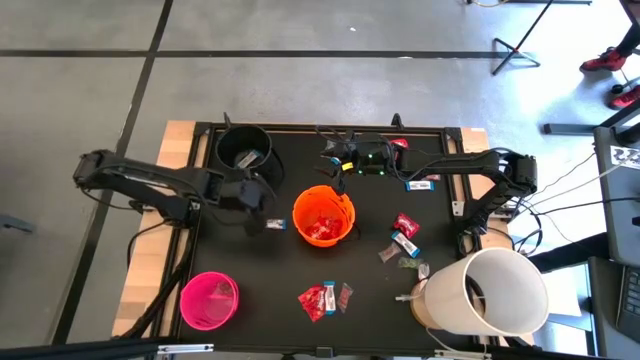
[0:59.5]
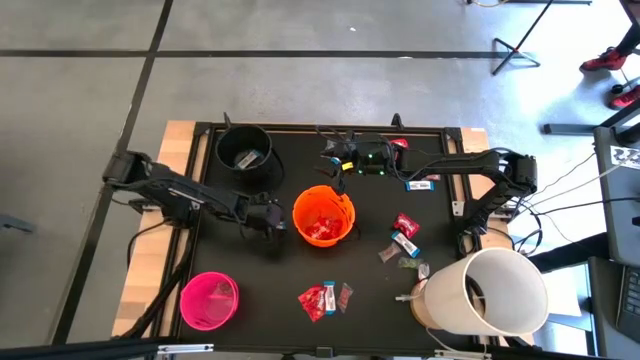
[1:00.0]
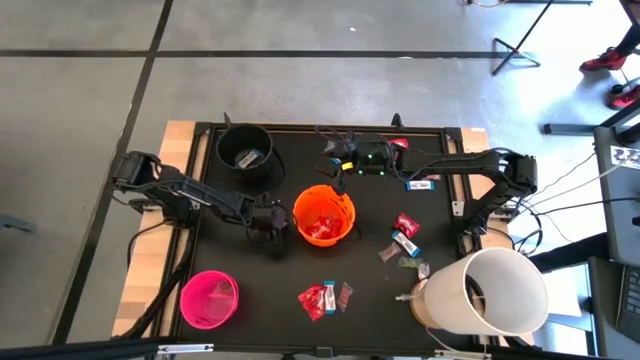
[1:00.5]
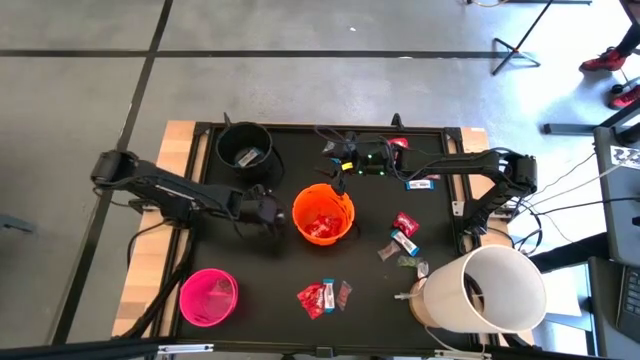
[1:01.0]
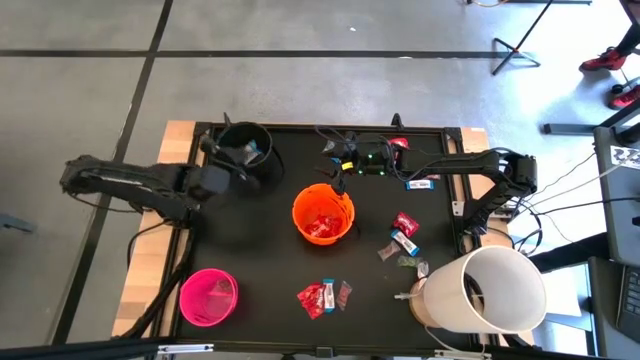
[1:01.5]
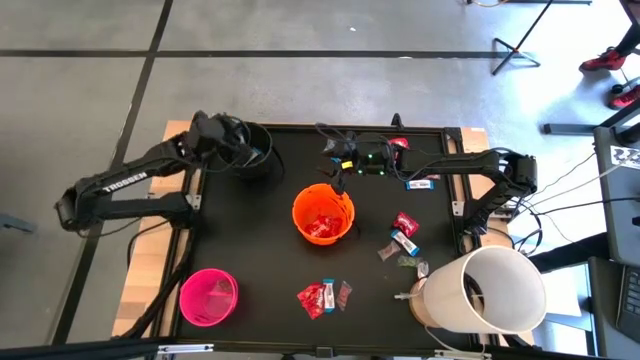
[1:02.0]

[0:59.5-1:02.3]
Task: Sort candy
Put the white chocolate into the black bucket

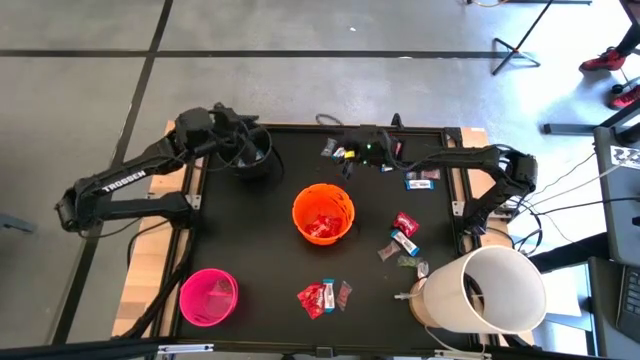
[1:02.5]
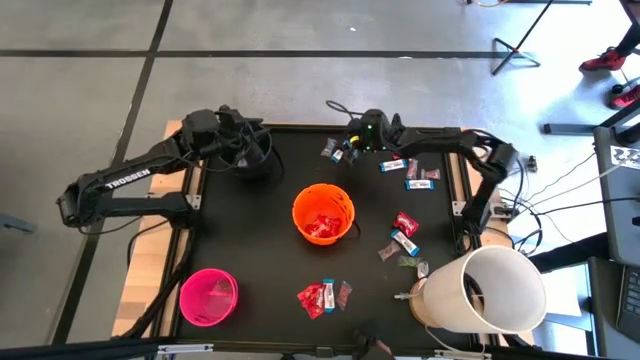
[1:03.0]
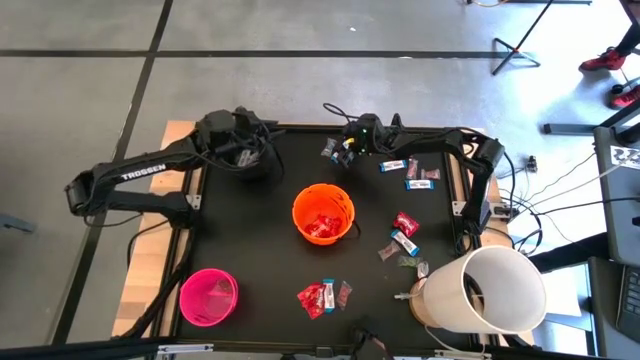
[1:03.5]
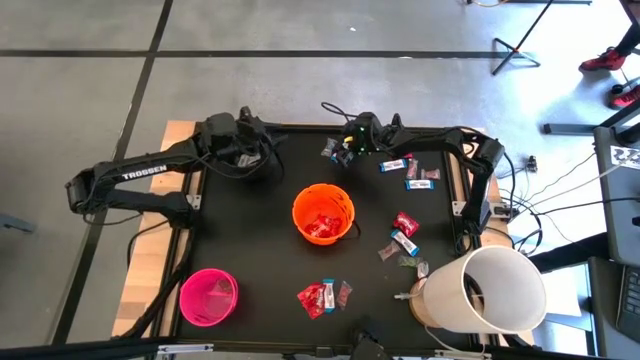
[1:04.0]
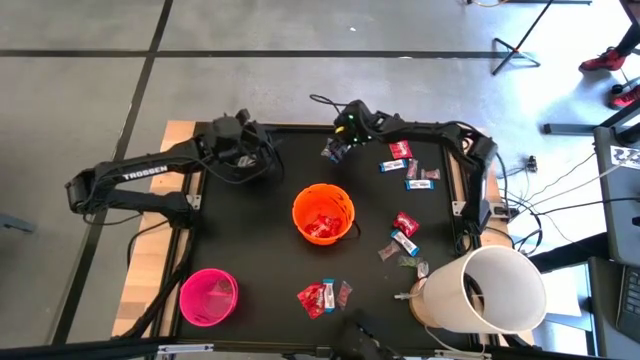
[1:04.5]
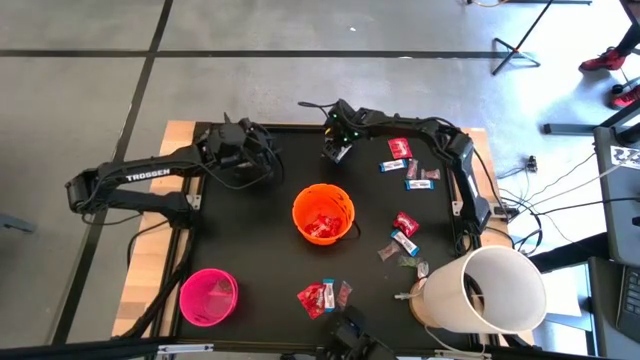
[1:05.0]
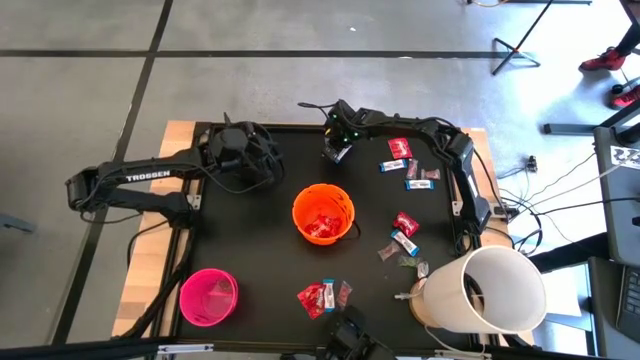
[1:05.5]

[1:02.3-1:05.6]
Put the transparent candy into the pink bucket

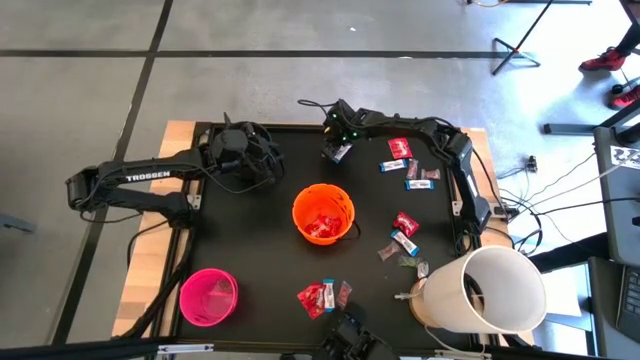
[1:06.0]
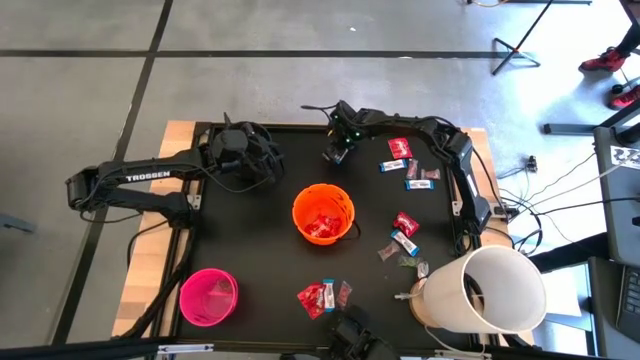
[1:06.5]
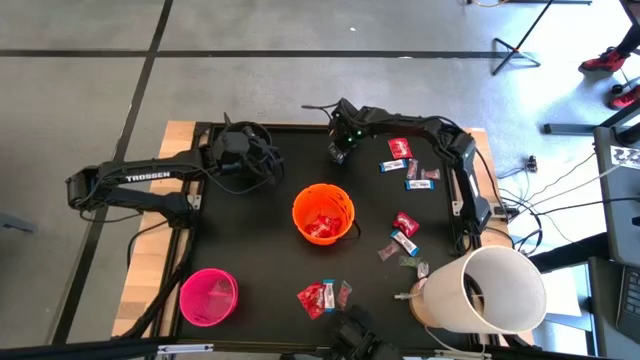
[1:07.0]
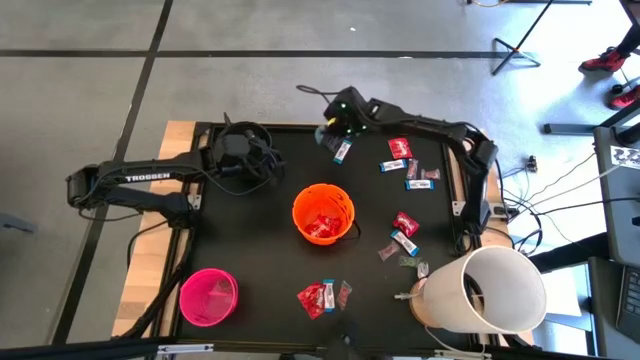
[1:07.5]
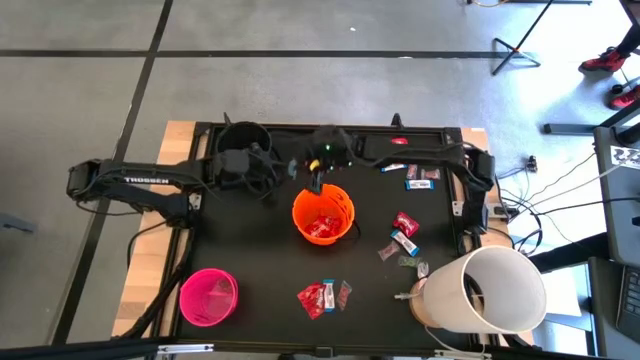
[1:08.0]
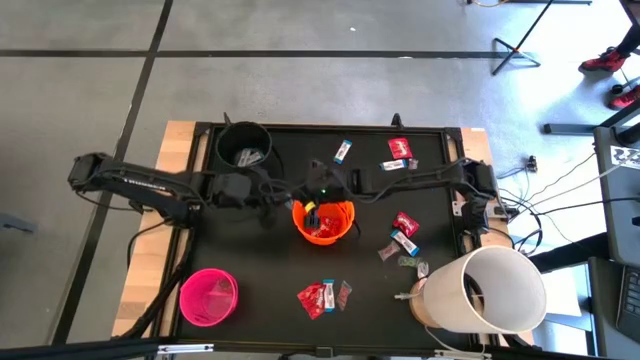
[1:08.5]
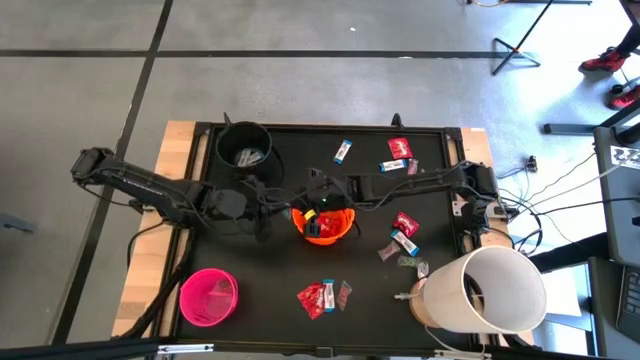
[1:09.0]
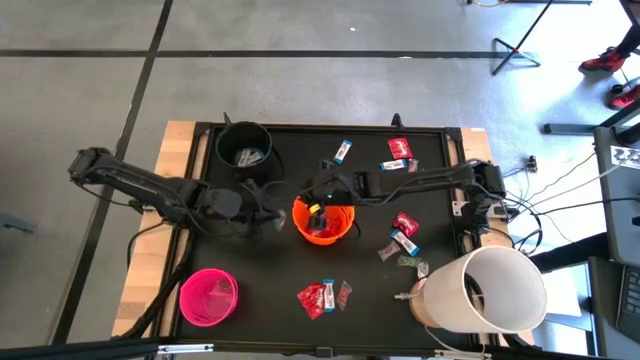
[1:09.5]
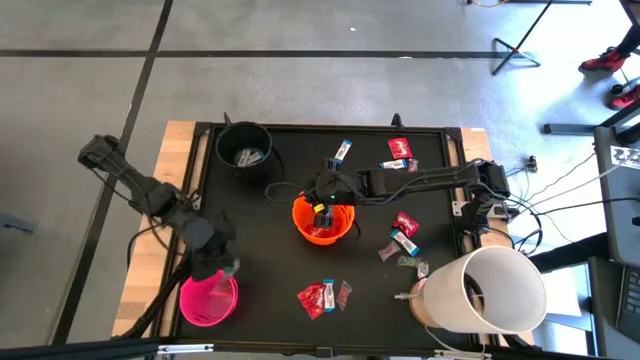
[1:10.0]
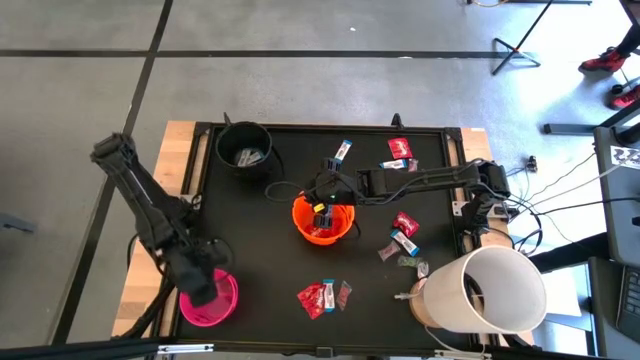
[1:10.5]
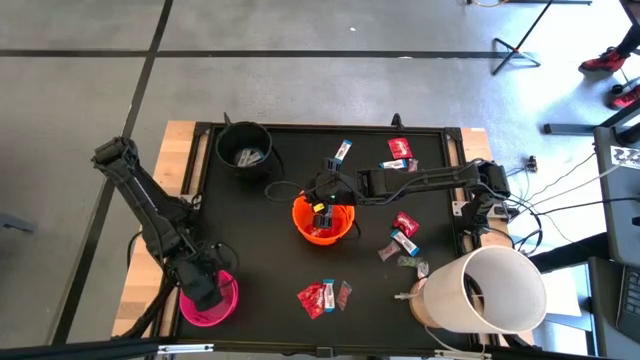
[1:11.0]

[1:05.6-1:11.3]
Put the transparent candy into the pink bucket

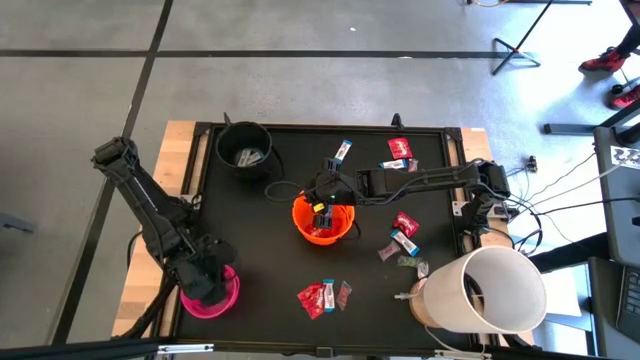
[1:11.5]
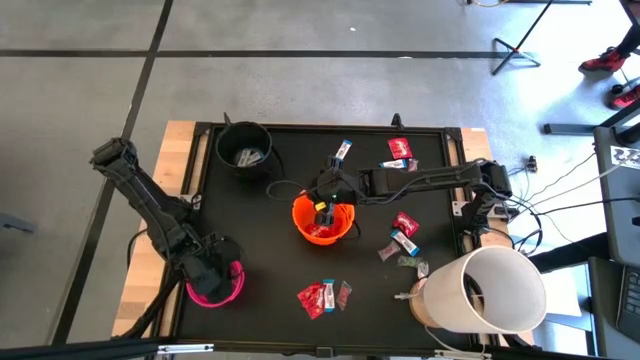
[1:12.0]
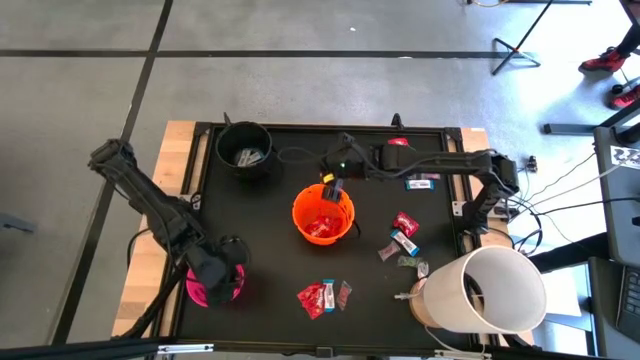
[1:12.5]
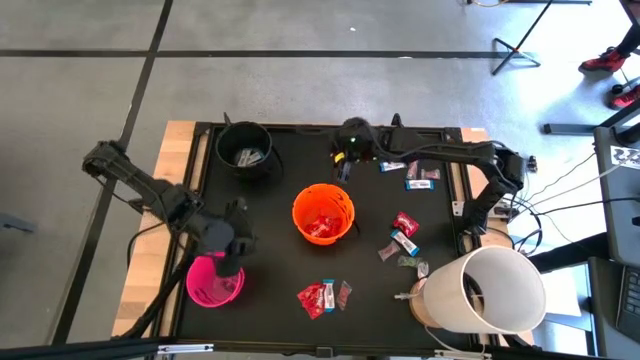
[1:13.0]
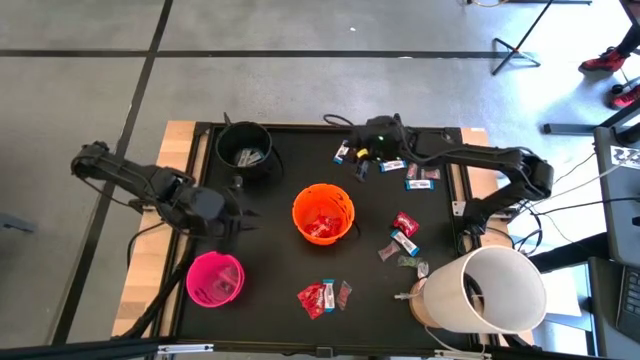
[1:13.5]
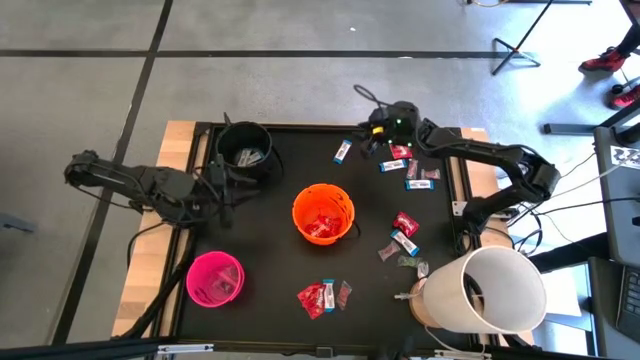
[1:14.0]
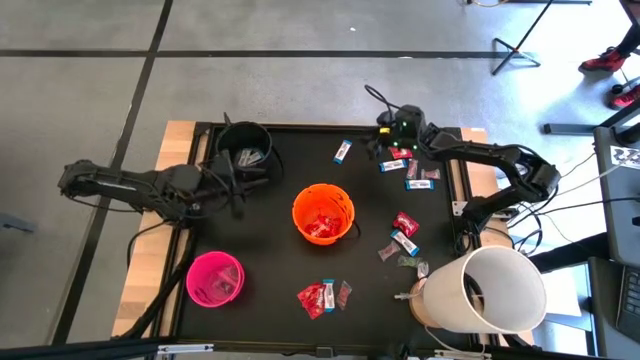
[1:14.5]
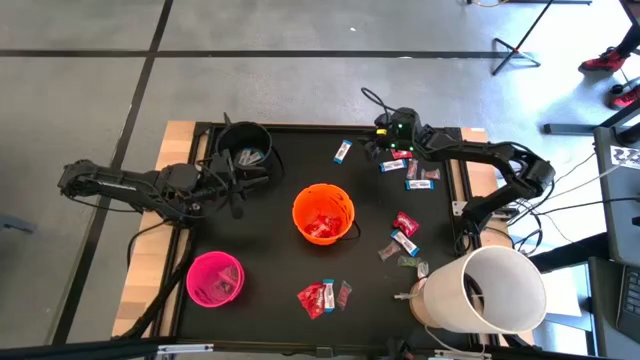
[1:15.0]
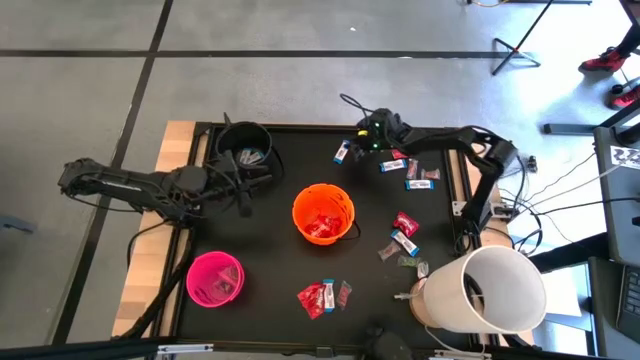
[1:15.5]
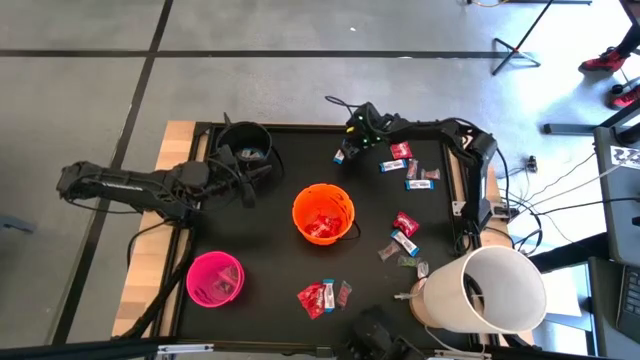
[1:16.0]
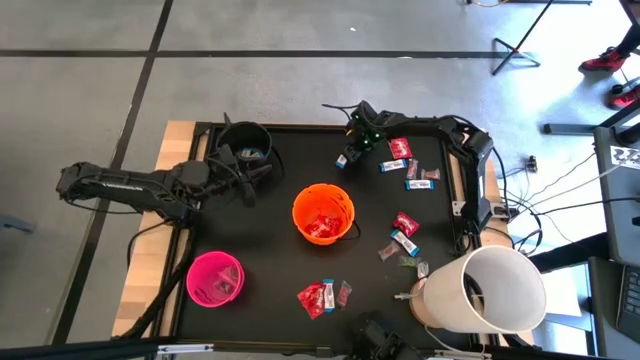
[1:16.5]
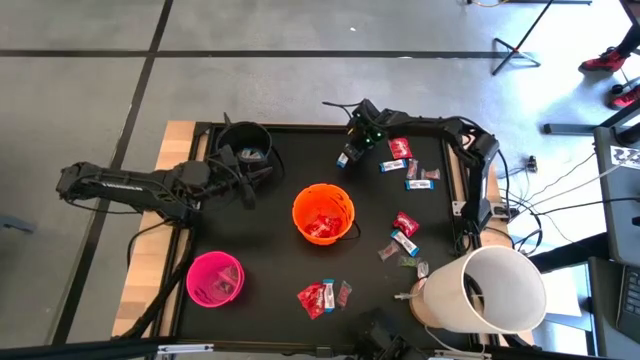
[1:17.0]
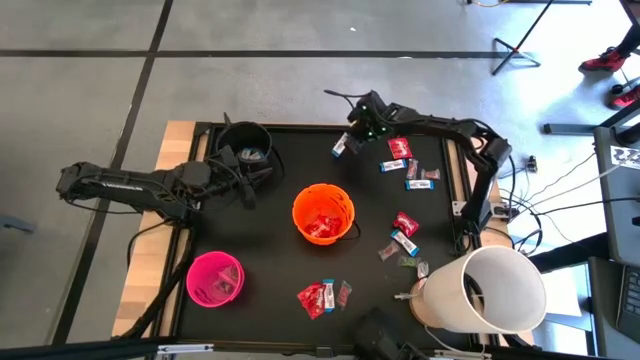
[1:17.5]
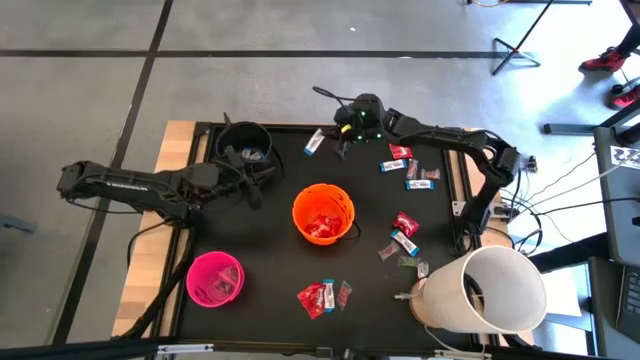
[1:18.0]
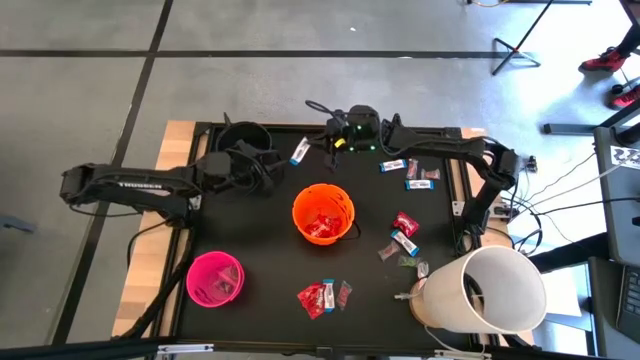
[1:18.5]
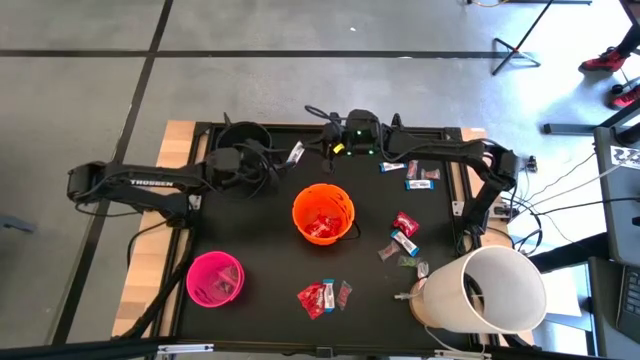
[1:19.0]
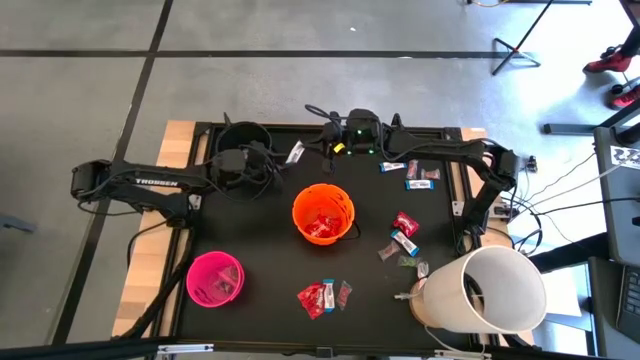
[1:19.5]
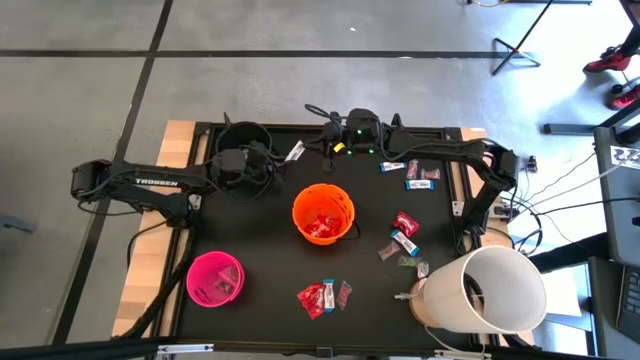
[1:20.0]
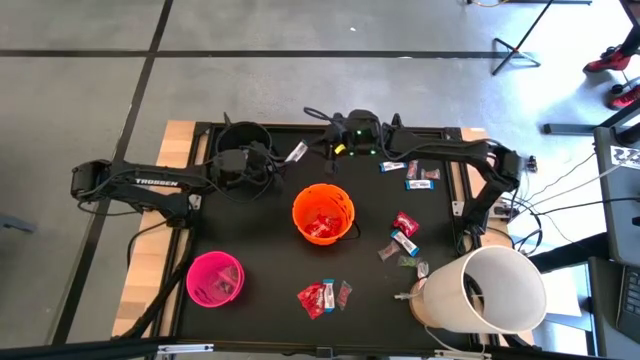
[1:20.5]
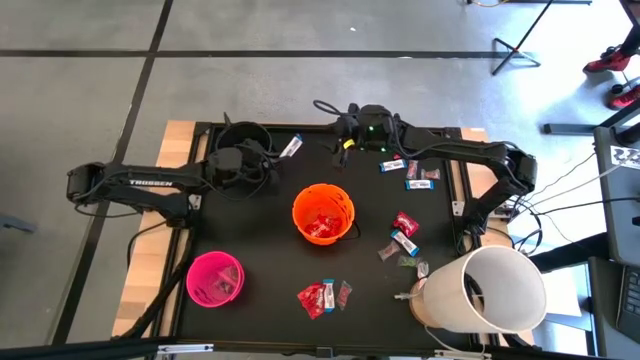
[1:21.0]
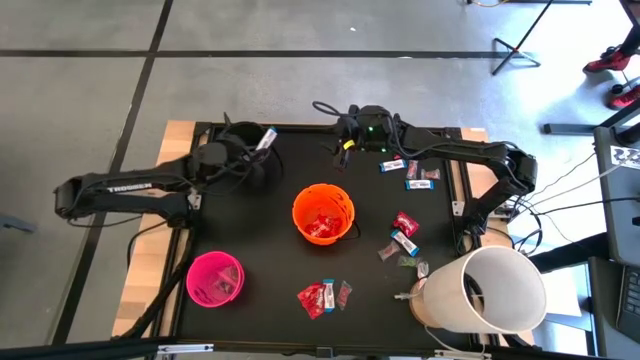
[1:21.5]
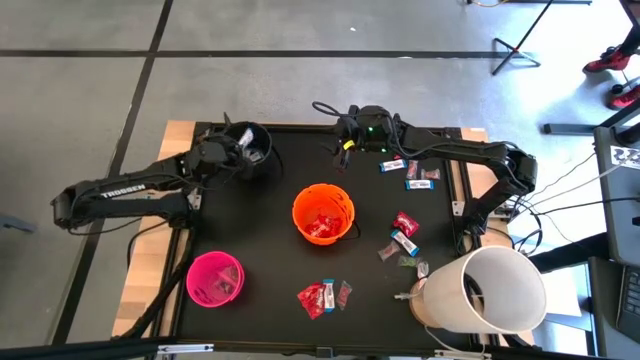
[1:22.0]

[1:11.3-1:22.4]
Put the white chocolate into the black bucket
